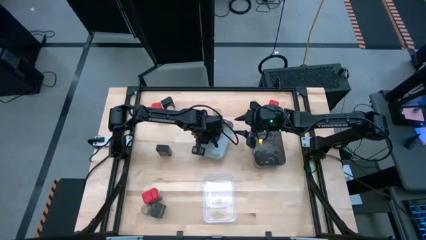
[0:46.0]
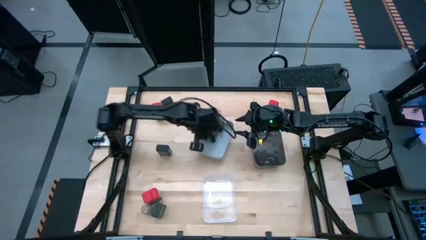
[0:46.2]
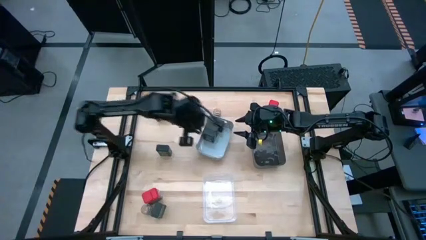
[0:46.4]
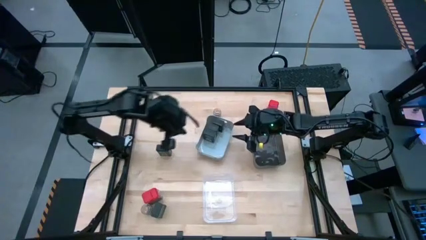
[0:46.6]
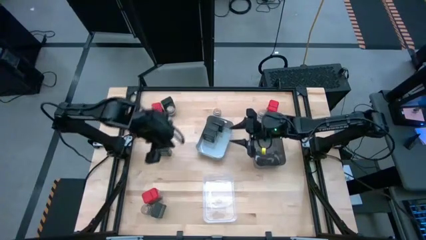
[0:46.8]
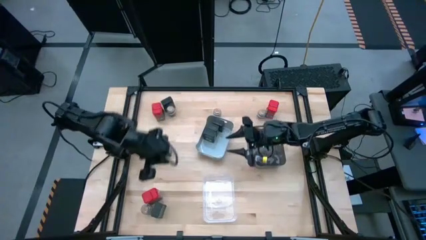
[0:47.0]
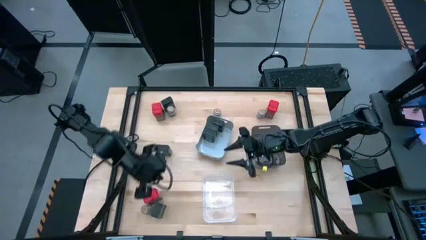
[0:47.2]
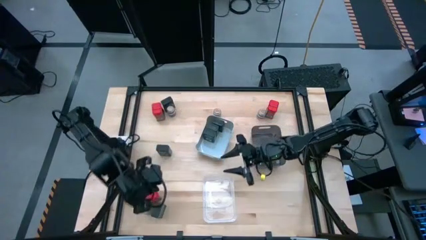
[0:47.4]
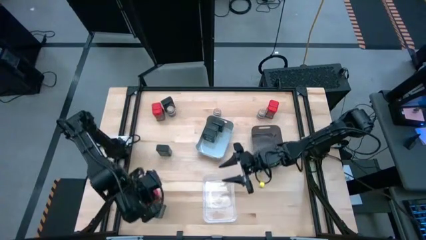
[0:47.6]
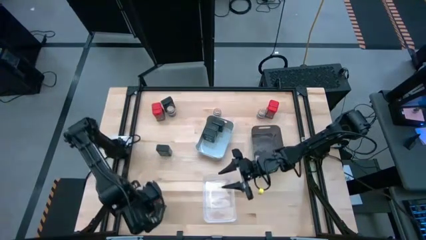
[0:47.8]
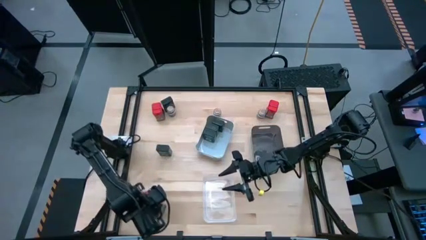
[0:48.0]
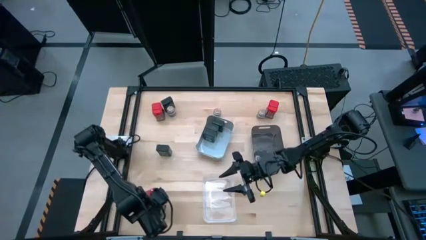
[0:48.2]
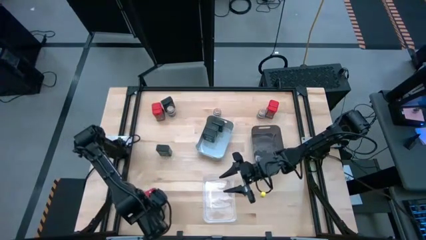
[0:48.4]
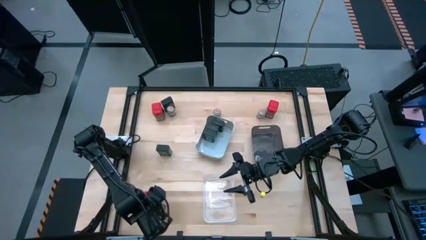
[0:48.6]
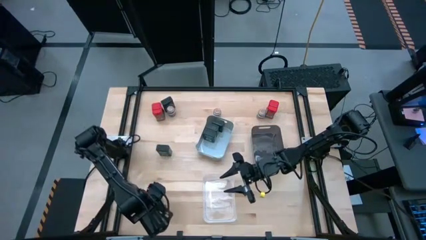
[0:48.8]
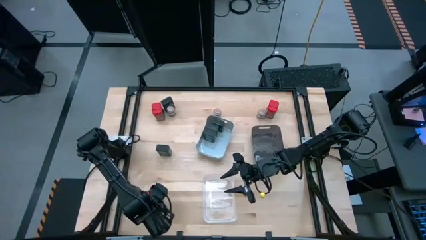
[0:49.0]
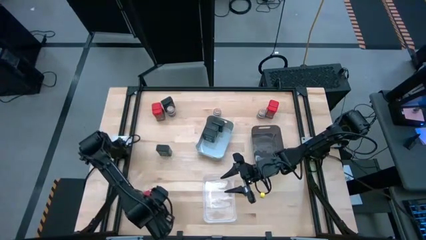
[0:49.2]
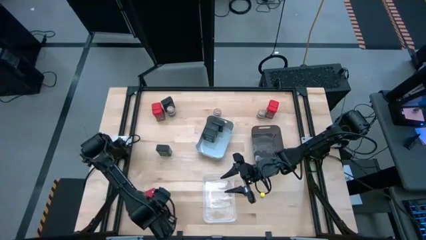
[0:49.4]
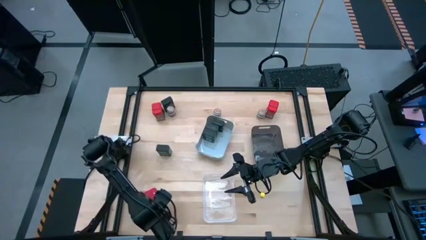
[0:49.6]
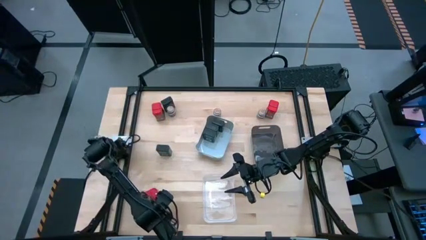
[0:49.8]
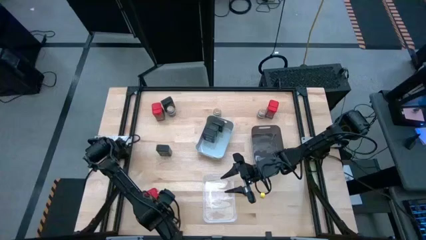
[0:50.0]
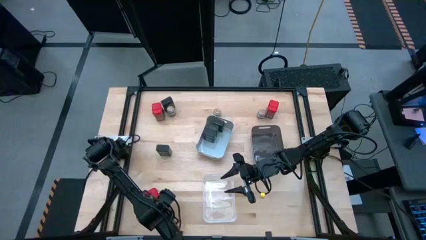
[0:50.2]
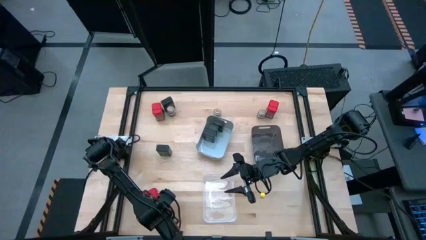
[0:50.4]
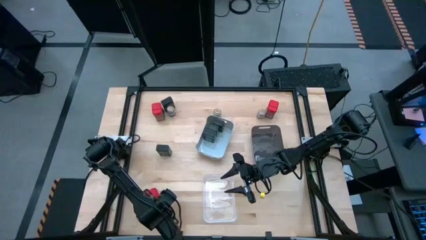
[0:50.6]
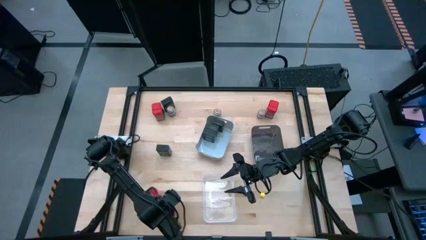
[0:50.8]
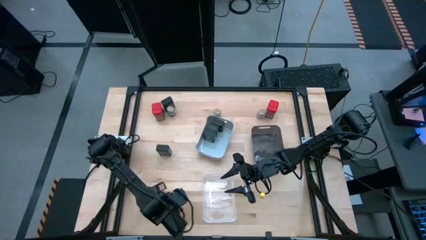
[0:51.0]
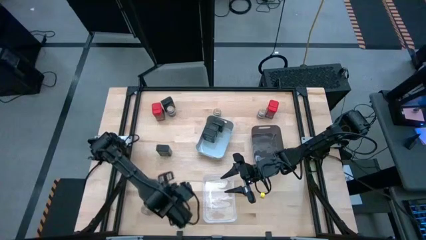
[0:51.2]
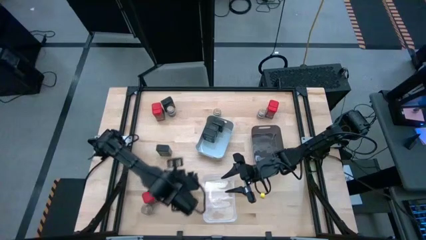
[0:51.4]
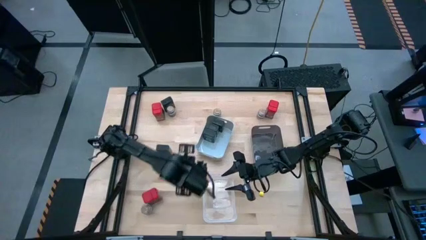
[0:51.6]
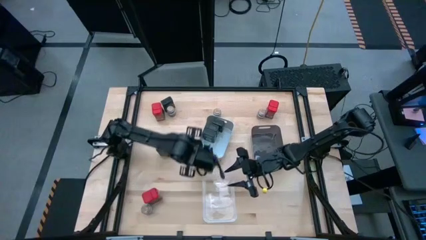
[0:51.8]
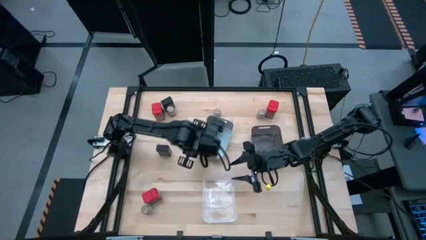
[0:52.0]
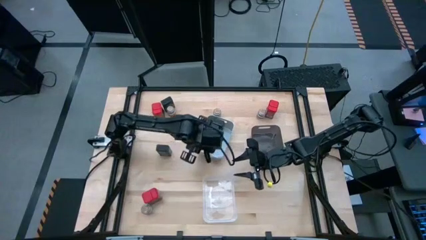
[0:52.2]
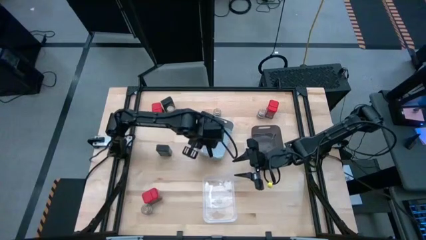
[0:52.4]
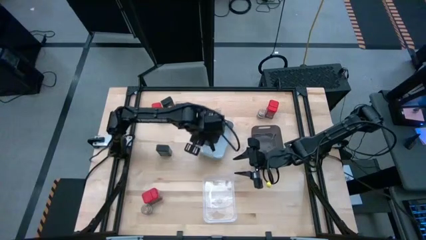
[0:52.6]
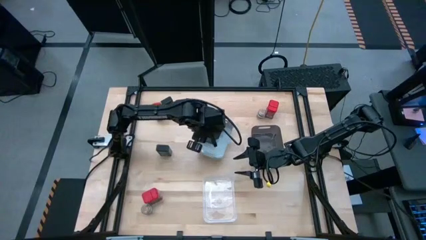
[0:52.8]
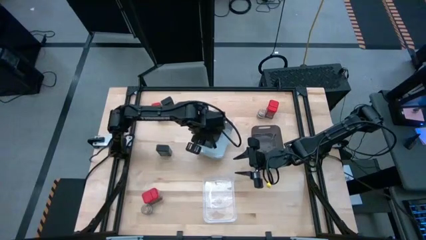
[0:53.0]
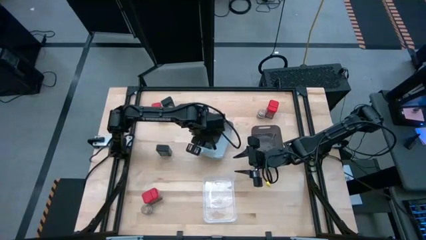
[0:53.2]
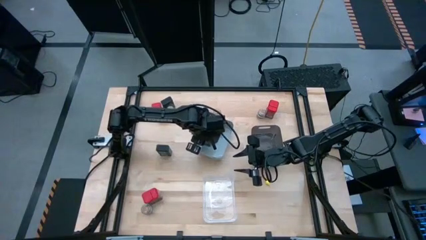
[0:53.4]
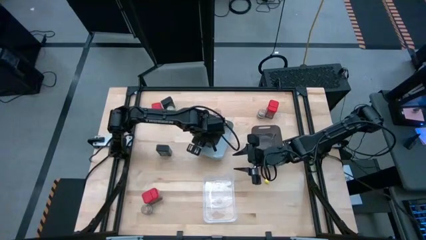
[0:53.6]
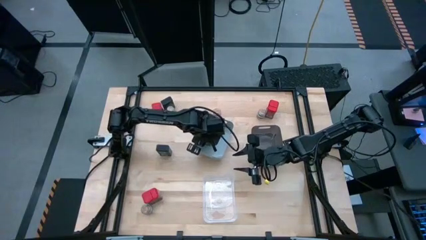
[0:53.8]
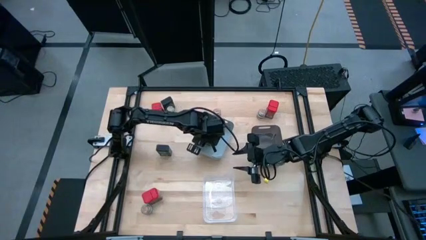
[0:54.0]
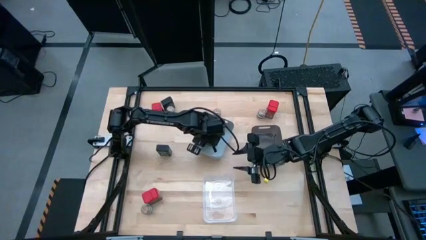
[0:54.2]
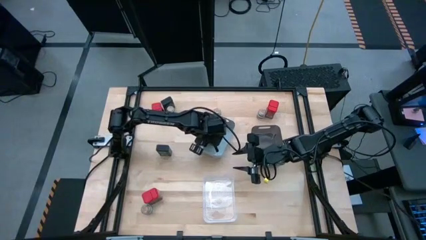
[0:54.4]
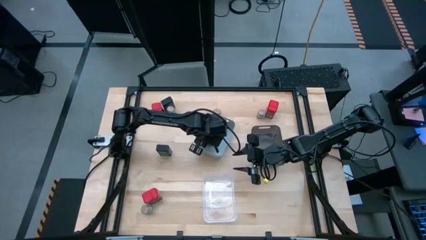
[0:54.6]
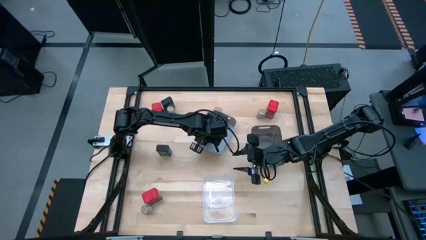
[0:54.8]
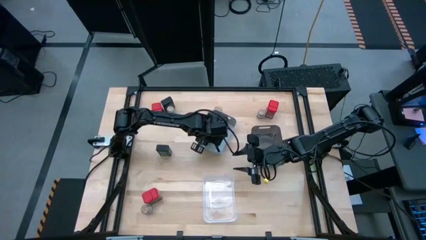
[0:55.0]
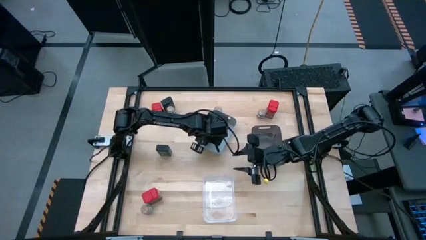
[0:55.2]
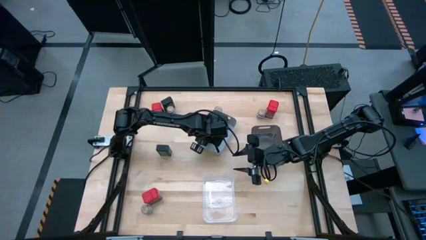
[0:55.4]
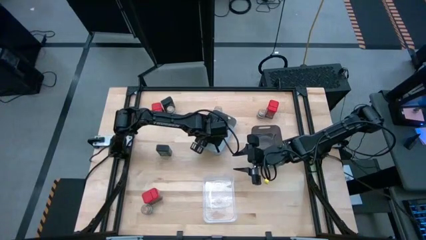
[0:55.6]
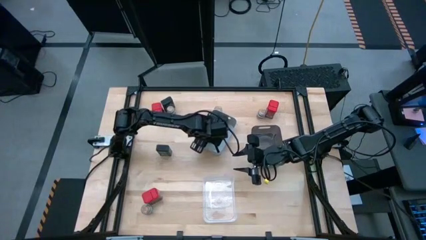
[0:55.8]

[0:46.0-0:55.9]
Task: Sort spices by type
Put the black spice can into the gray bin

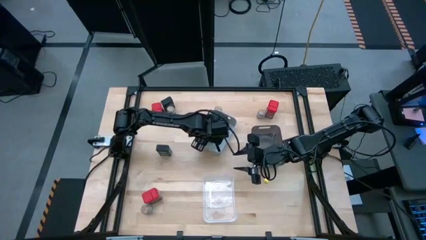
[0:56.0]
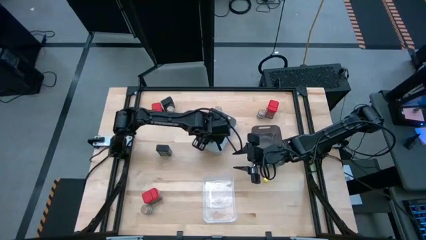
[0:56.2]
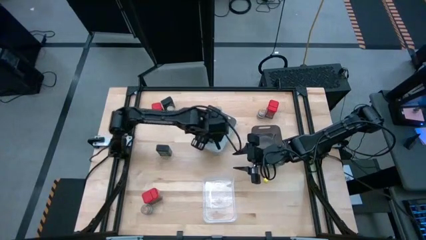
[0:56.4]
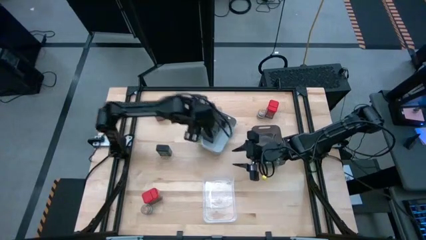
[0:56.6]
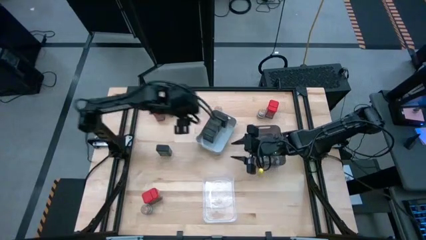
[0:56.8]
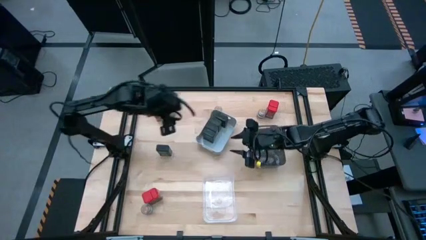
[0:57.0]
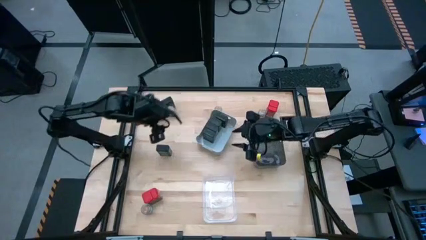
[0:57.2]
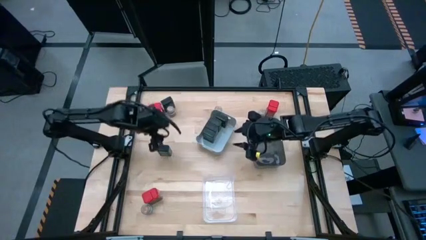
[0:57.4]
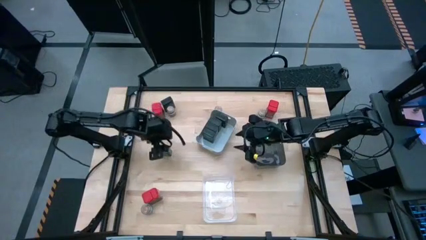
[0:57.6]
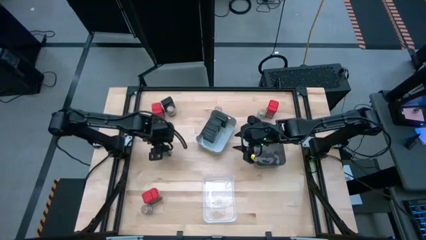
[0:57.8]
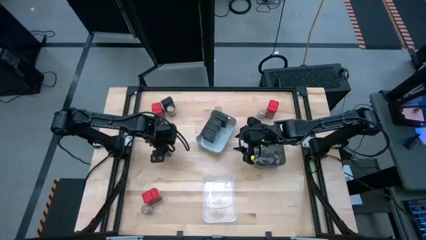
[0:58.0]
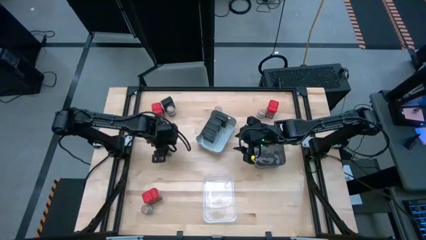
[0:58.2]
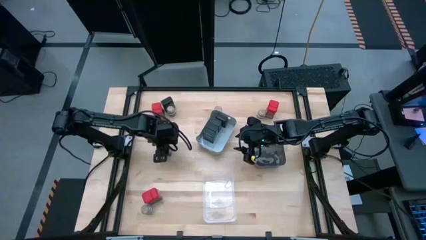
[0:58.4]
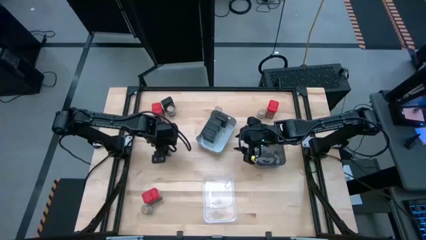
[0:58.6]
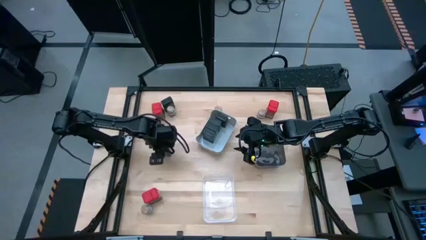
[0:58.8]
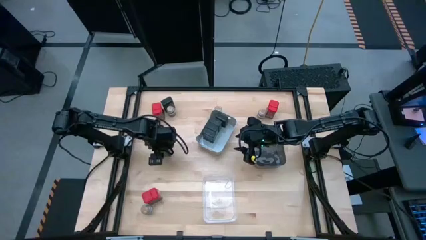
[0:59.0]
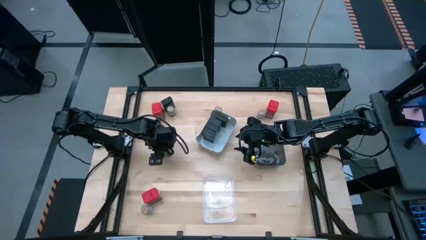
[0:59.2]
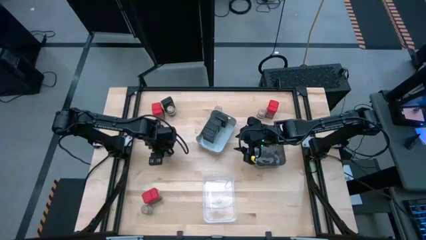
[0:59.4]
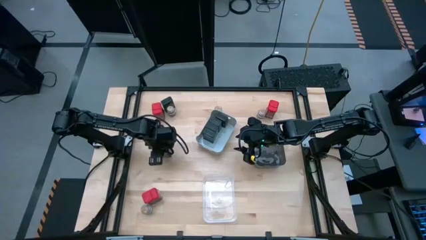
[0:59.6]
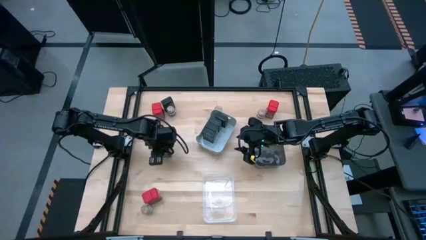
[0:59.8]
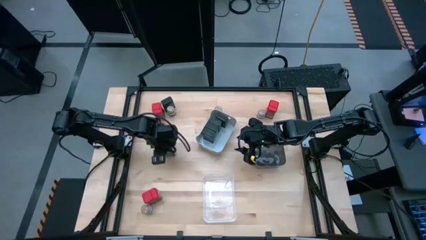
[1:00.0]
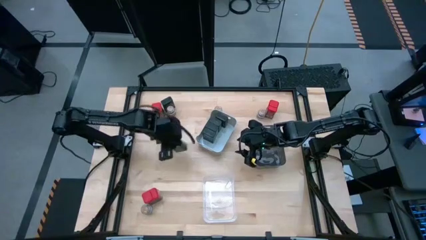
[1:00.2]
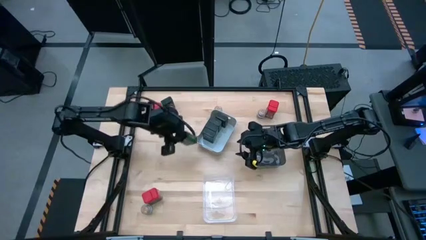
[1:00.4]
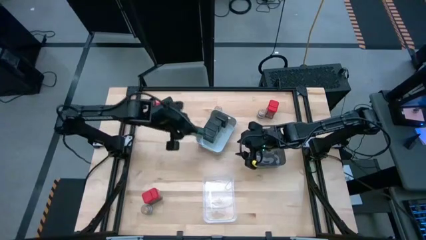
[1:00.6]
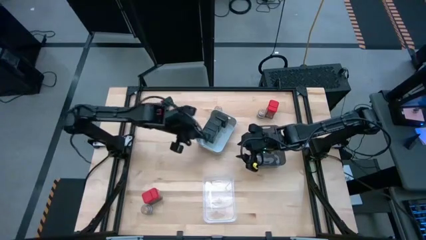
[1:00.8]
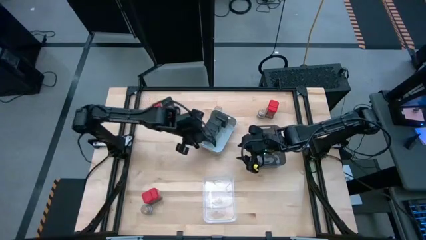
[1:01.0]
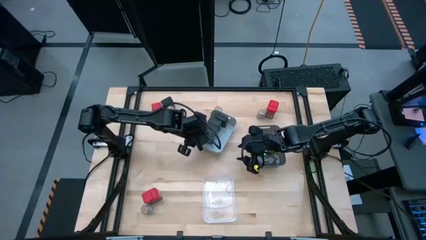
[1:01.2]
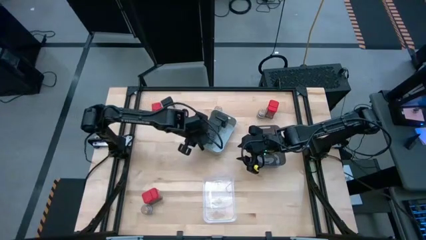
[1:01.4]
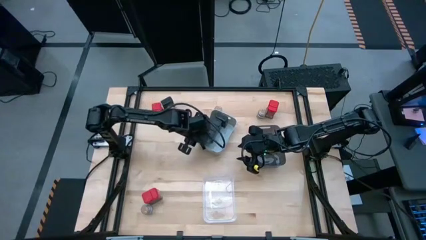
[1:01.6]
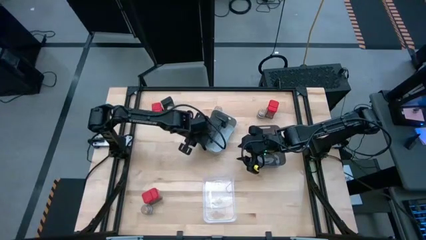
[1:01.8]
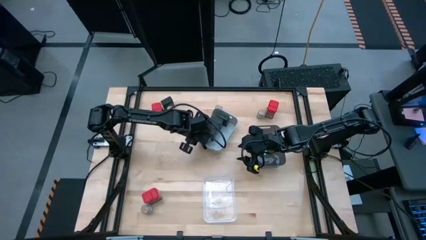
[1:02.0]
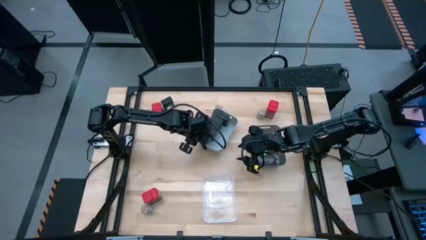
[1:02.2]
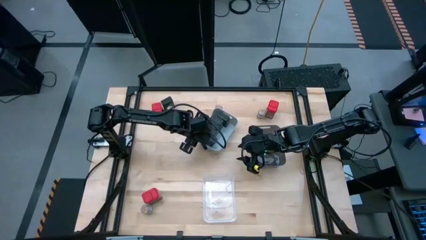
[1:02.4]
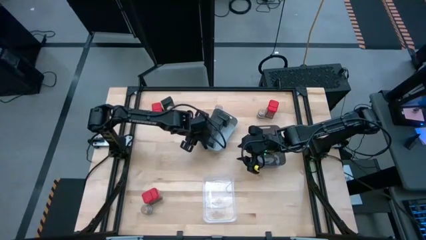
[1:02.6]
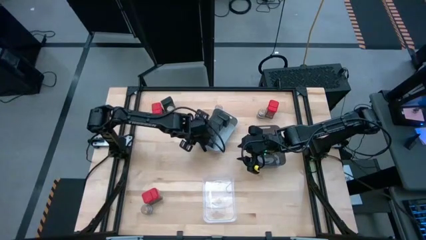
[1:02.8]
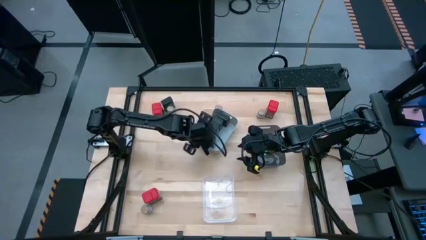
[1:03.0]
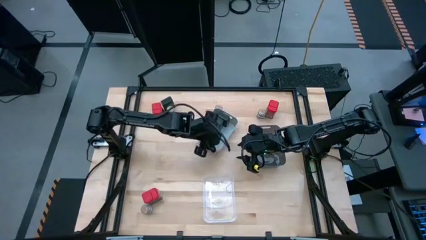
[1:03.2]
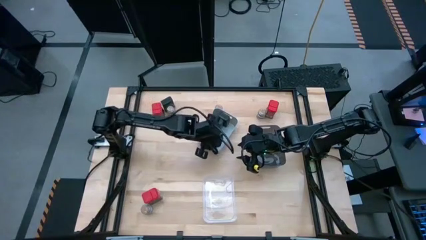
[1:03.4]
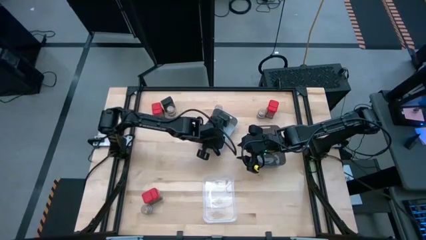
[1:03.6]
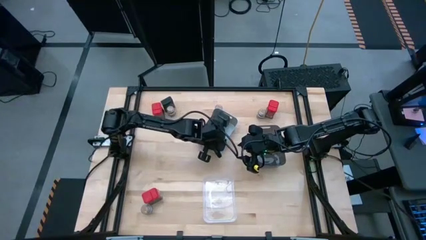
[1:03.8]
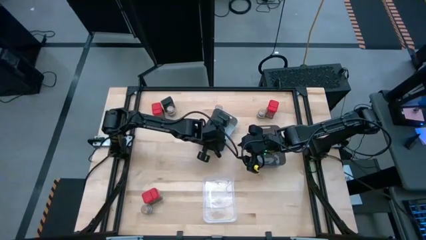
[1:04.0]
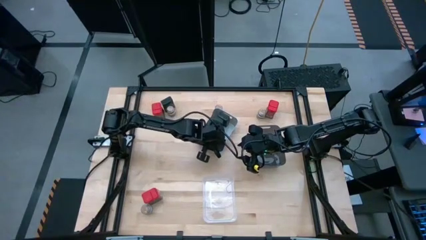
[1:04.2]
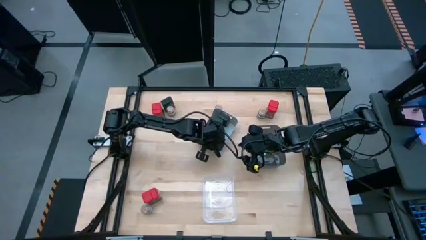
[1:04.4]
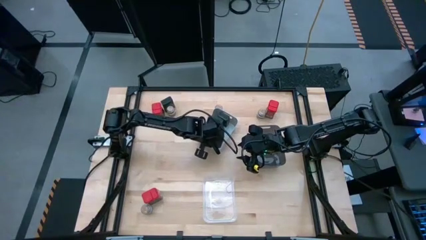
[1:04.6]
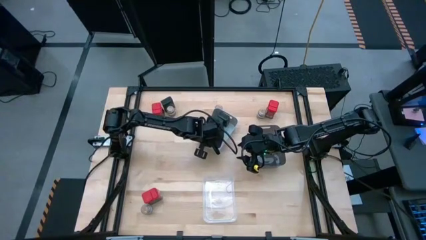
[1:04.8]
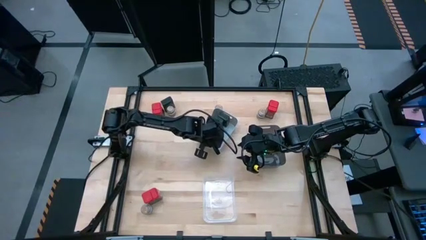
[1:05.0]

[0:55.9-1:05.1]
Put the black spice can into the gray bin
